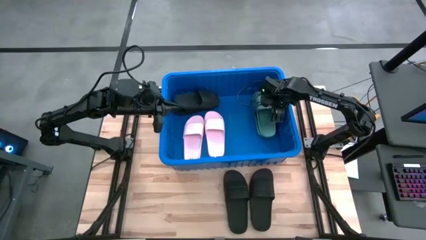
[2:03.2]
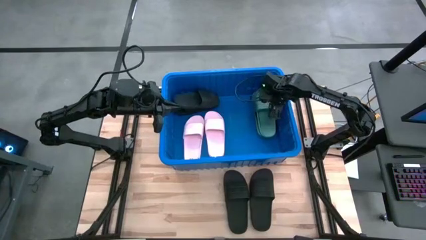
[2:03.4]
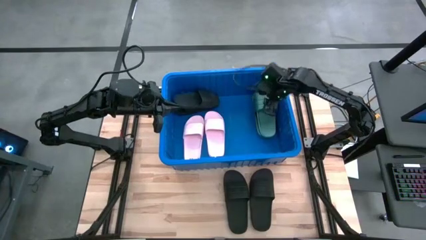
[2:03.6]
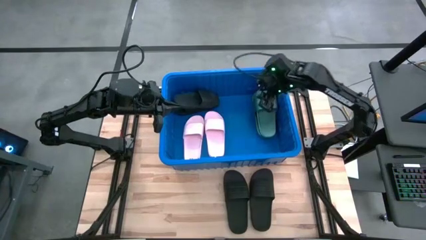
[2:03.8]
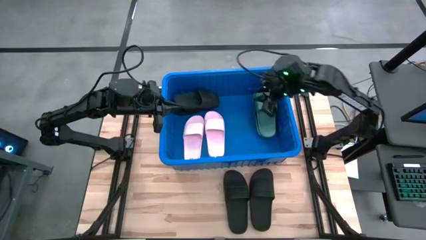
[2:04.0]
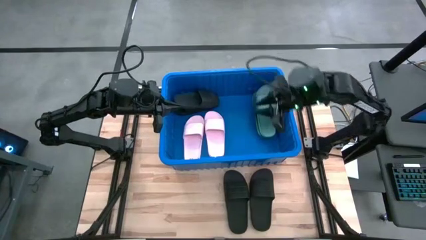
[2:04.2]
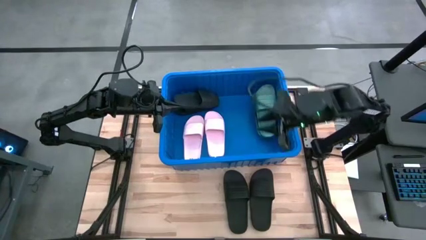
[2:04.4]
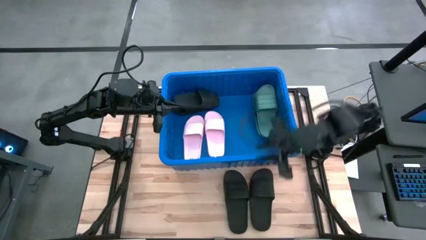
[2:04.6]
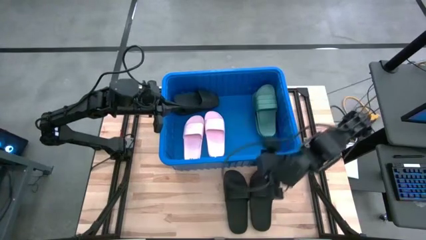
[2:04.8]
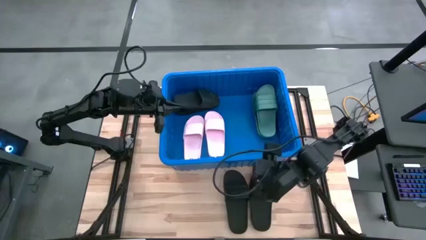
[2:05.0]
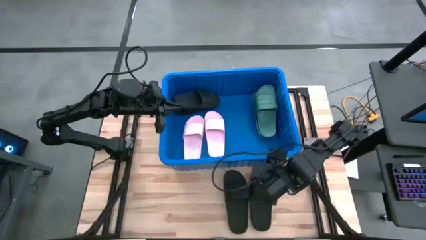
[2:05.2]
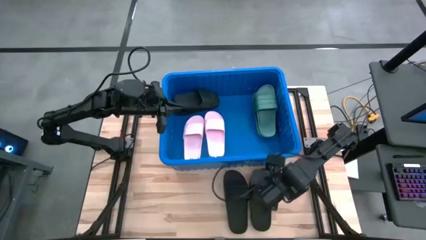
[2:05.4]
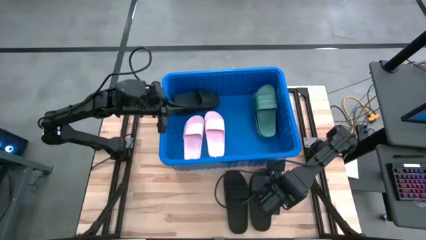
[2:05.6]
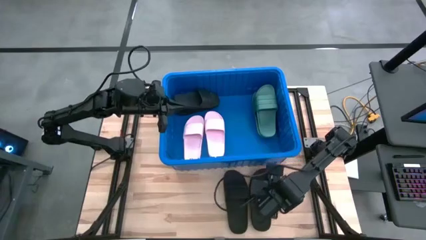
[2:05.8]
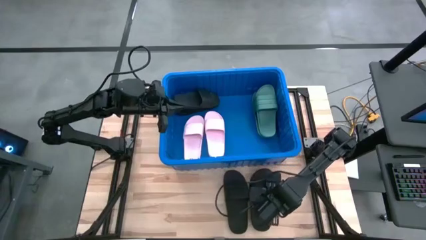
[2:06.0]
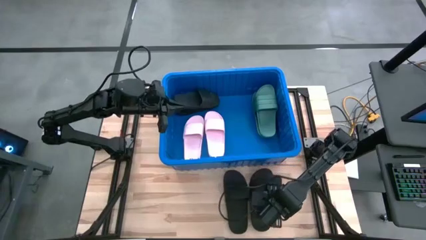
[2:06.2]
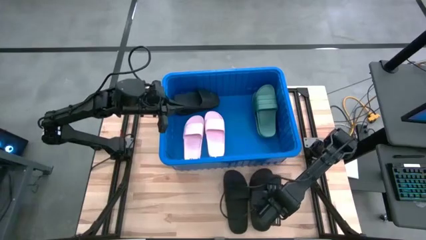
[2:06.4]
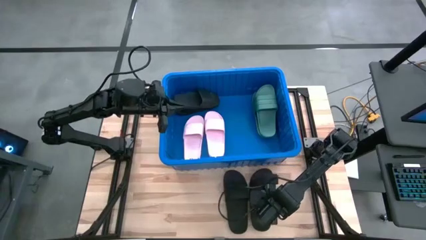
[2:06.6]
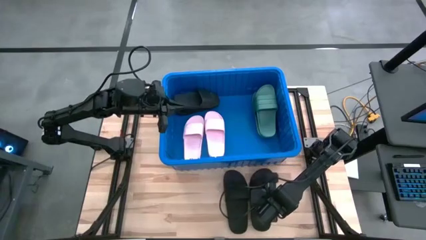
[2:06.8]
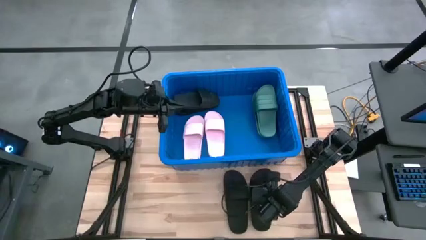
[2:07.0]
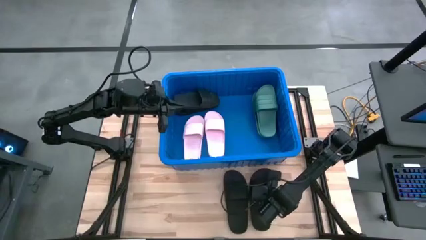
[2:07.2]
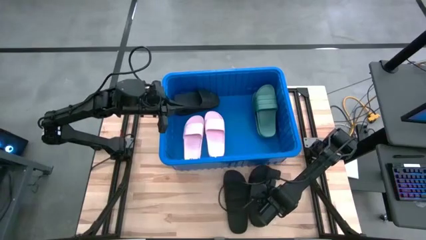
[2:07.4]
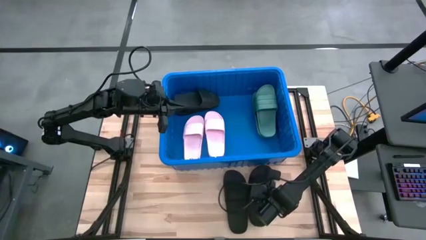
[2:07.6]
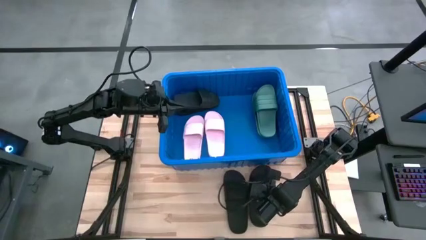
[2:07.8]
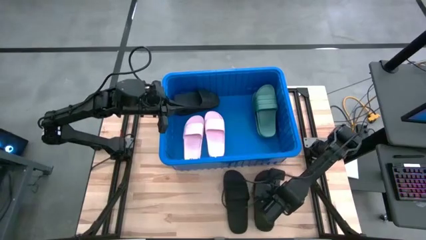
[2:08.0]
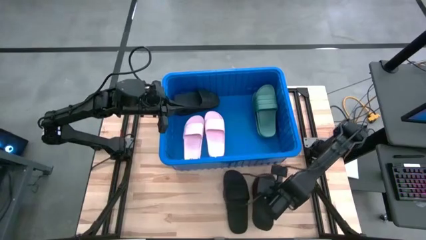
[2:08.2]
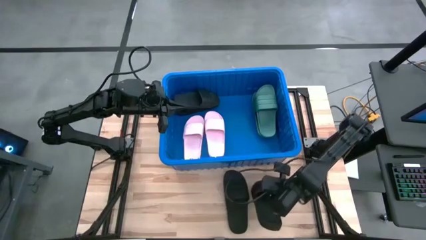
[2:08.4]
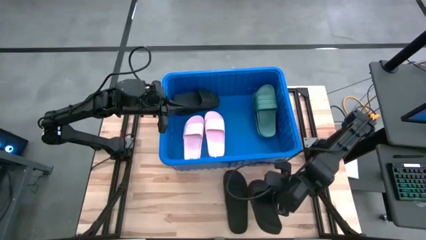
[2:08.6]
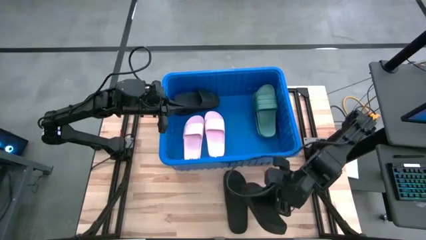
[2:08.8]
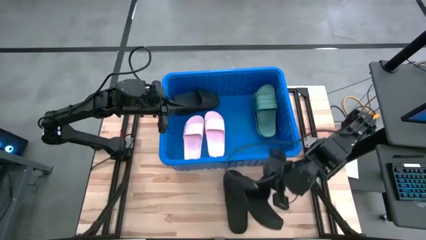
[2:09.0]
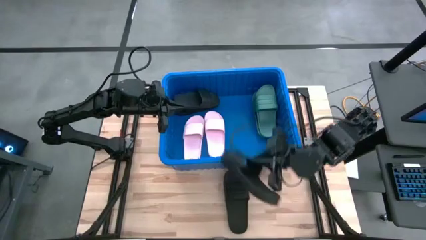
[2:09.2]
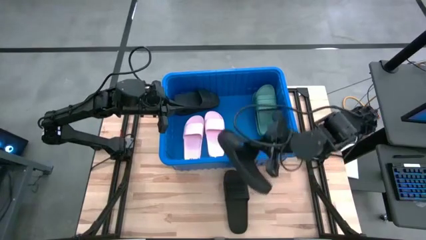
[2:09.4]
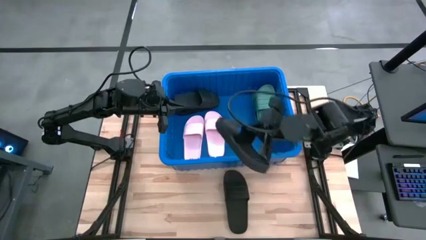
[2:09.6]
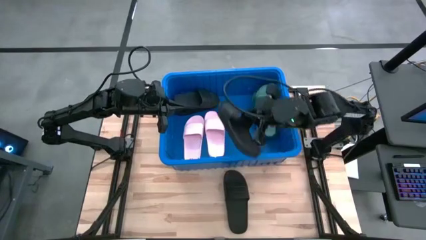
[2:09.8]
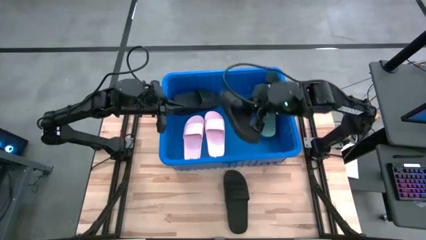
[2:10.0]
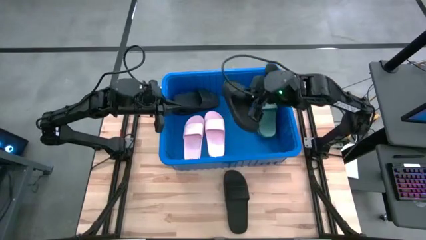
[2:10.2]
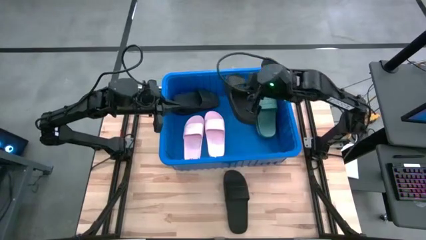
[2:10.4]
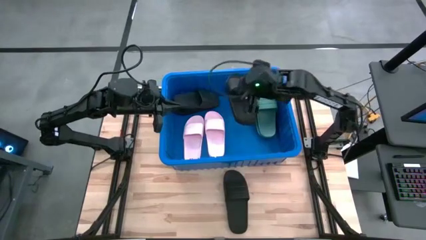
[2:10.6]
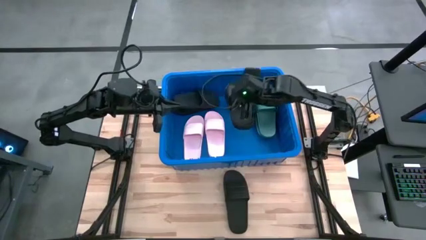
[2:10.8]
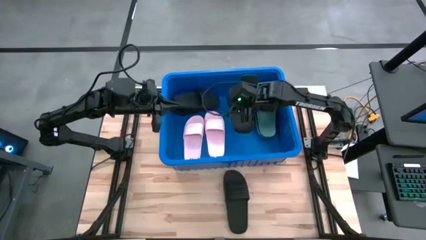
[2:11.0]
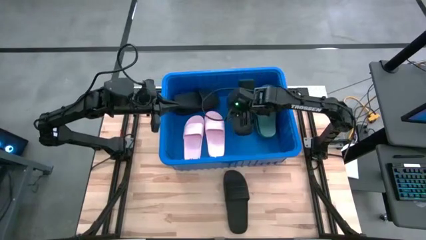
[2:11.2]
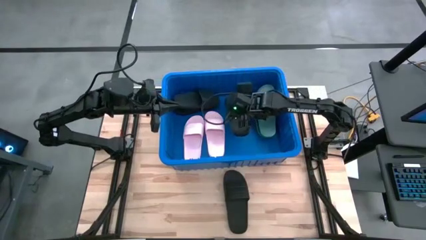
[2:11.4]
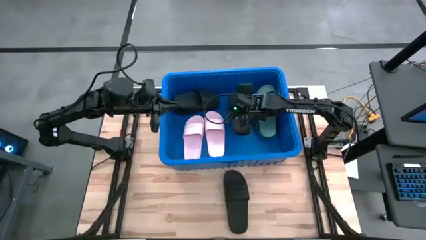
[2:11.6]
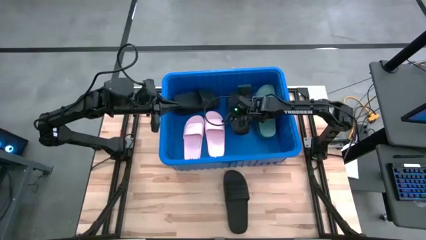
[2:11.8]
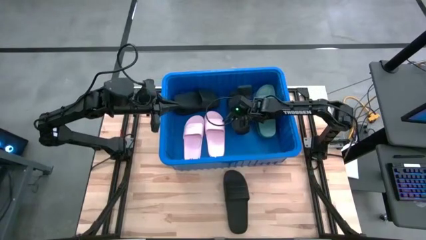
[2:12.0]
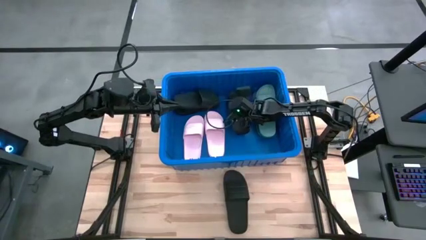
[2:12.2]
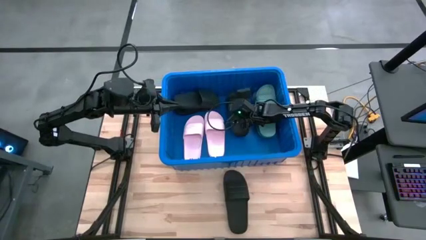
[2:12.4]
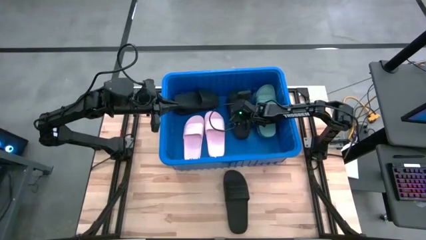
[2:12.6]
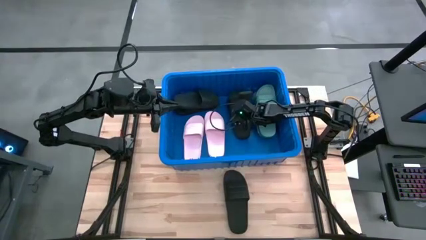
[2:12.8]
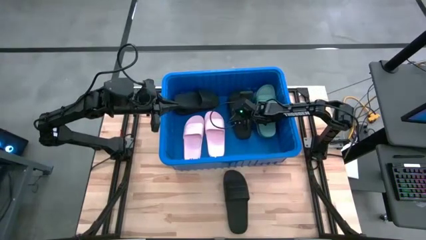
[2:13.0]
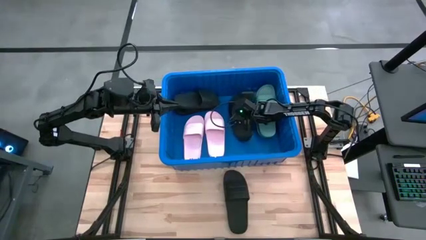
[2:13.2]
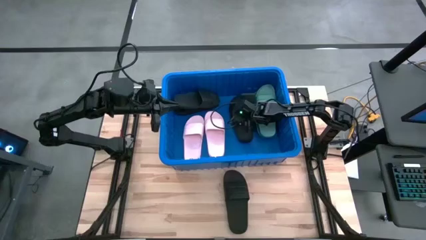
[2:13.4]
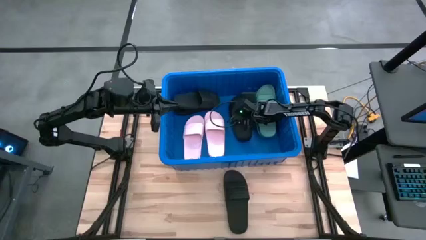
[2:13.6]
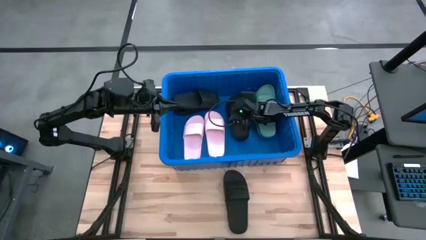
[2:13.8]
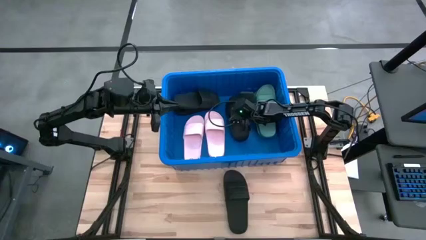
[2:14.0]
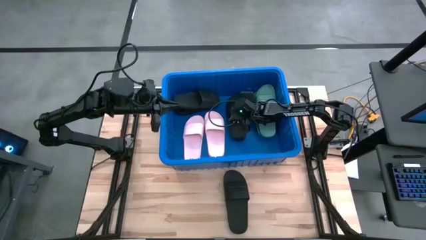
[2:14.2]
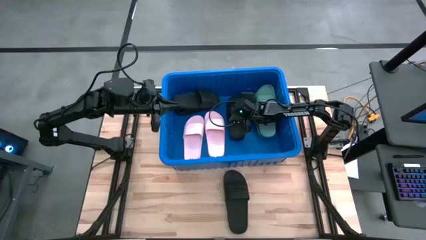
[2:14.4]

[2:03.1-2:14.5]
Task: Pick and place slides into bin
Put the black slide into the blue container

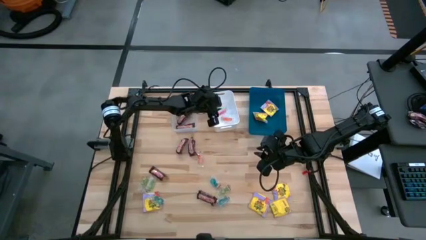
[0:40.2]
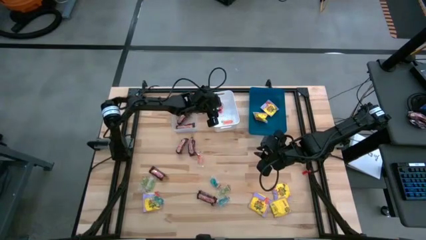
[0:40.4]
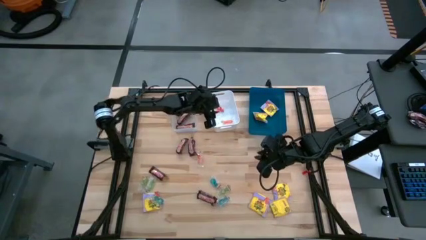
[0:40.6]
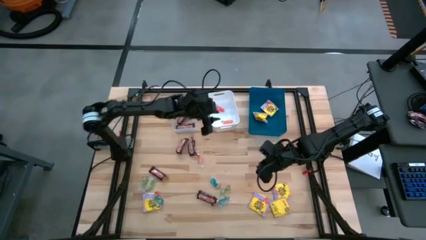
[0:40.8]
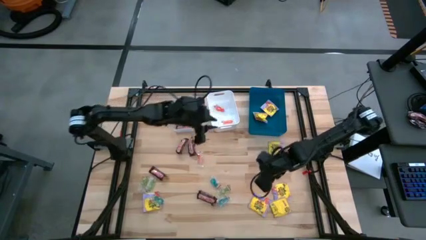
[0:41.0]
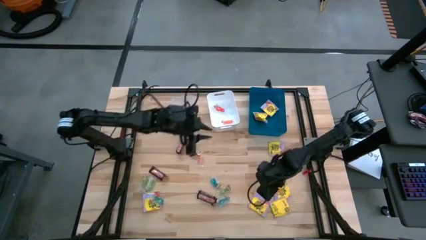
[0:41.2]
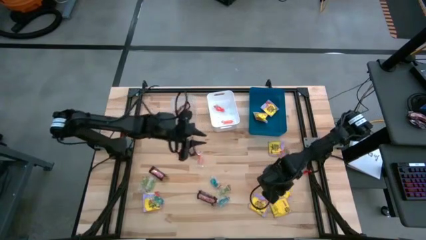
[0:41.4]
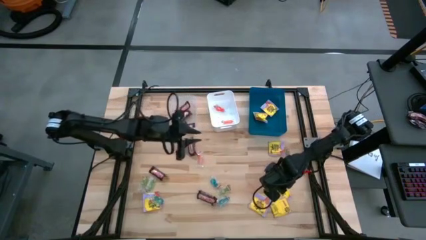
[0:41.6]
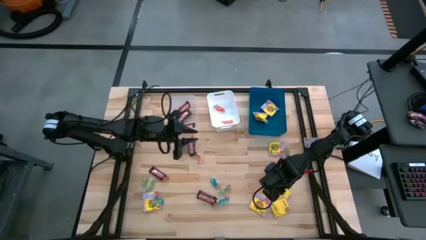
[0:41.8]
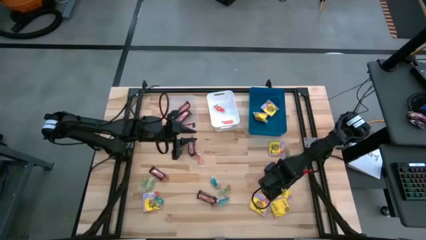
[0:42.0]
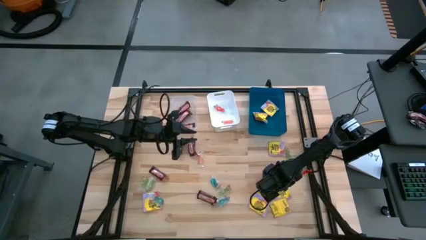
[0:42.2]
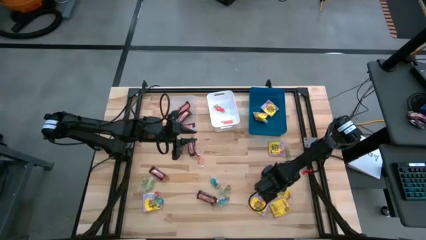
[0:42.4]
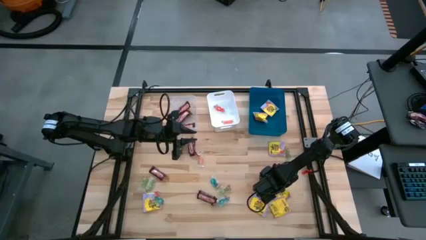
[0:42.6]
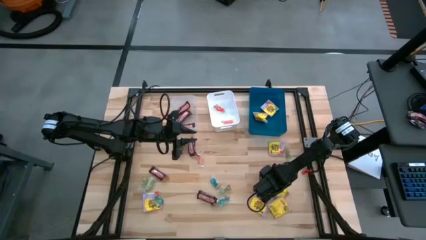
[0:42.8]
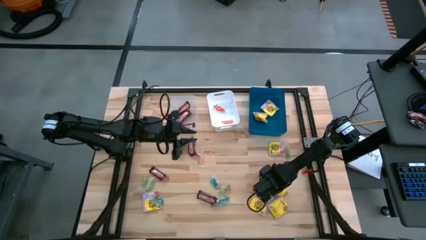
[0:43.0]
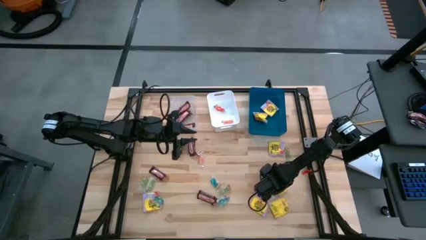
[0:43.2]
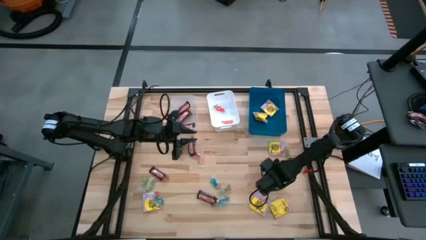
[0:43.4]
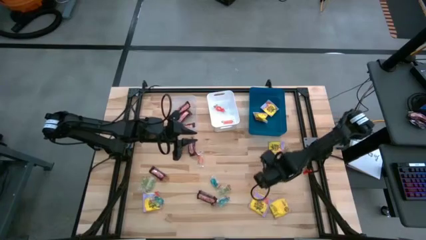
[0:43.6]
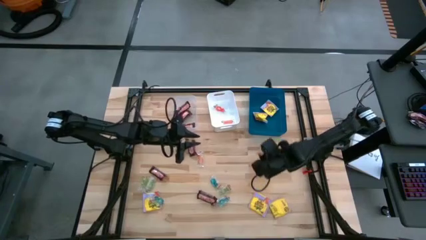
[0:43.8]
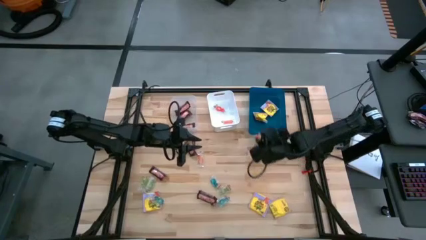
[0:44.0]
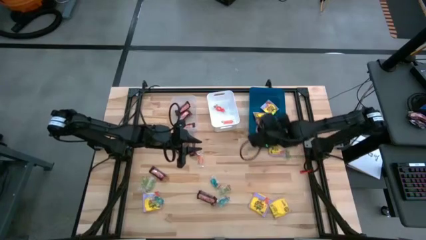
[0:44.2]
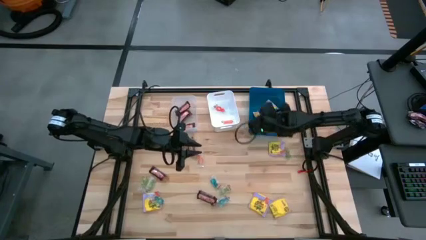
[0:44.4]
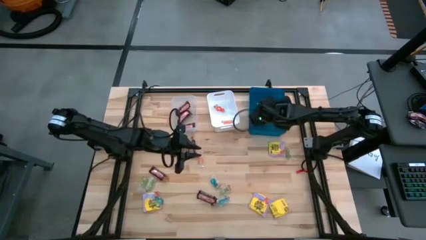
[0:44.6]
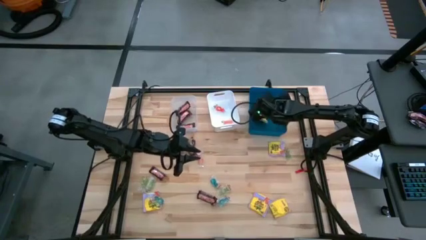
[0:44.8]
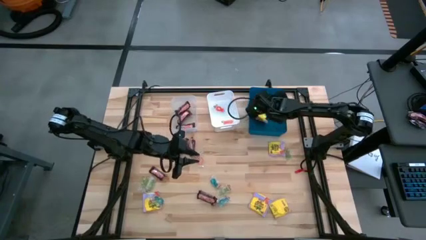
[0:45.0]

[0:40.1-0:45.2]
Task: Sort candy
Put the bottom right yellow sour patch candy into the blue bin
